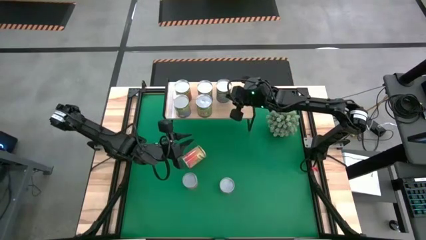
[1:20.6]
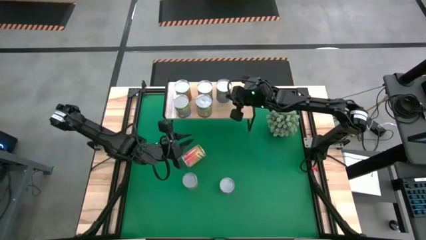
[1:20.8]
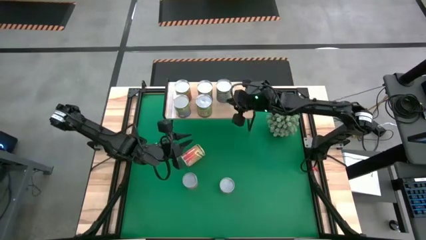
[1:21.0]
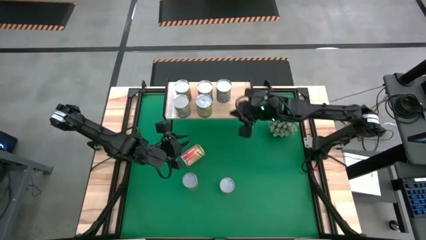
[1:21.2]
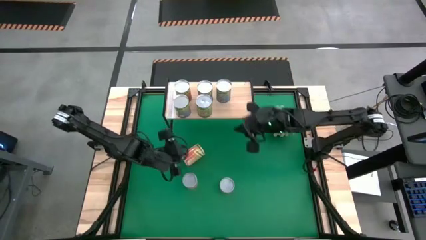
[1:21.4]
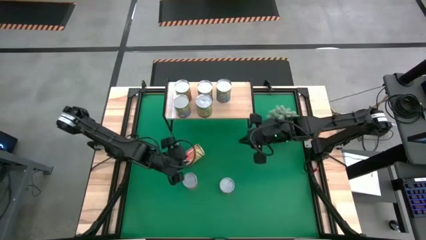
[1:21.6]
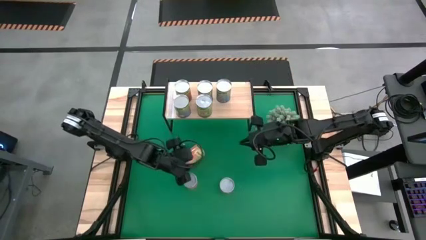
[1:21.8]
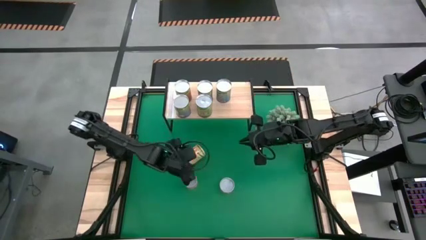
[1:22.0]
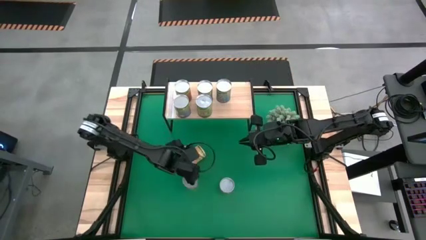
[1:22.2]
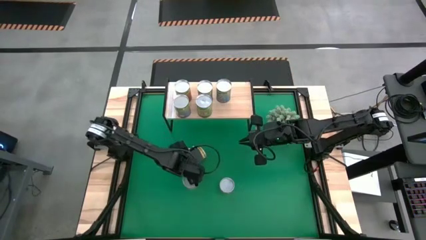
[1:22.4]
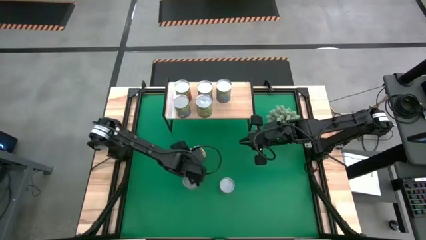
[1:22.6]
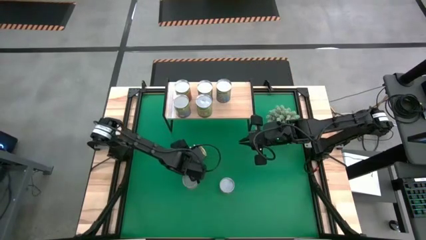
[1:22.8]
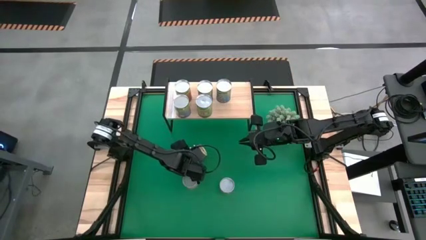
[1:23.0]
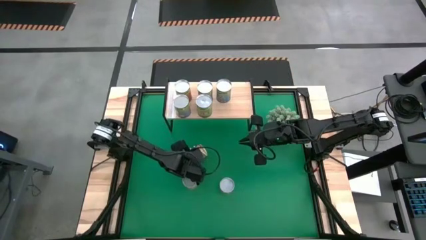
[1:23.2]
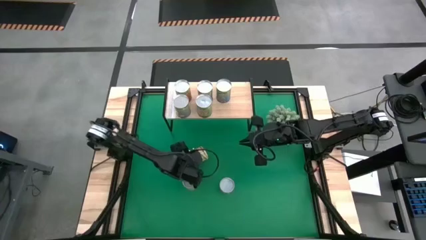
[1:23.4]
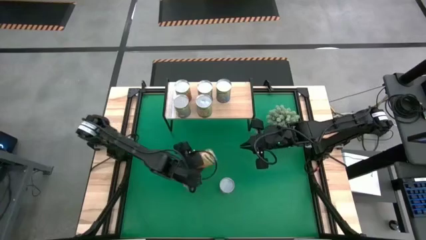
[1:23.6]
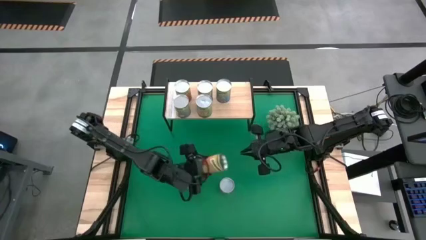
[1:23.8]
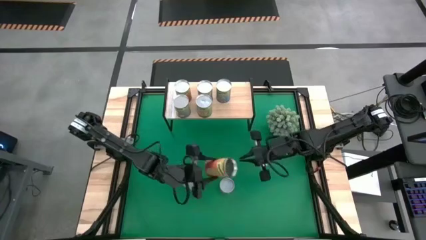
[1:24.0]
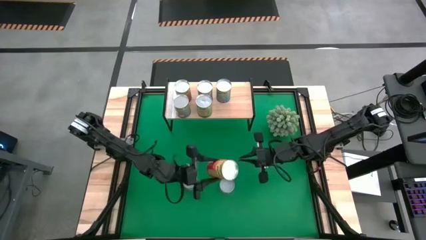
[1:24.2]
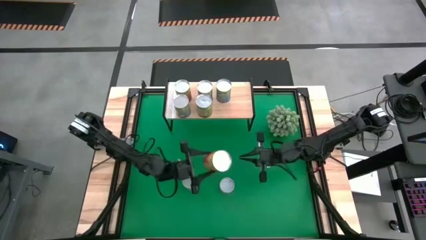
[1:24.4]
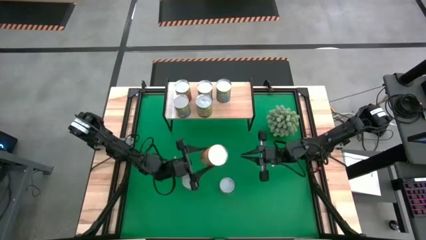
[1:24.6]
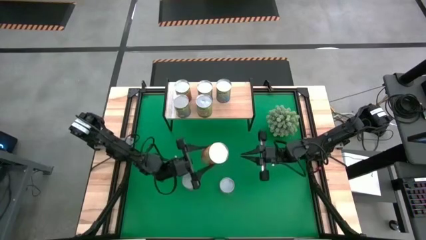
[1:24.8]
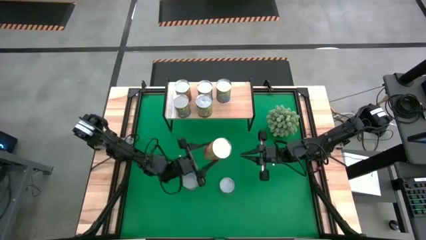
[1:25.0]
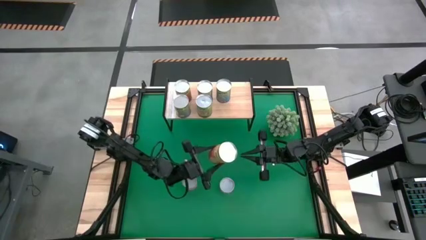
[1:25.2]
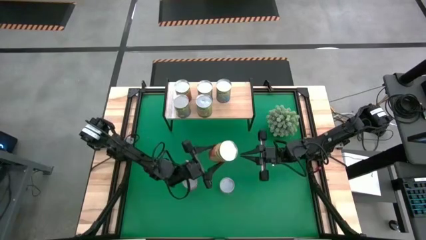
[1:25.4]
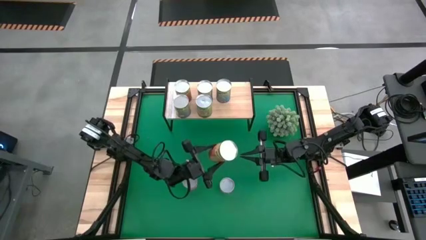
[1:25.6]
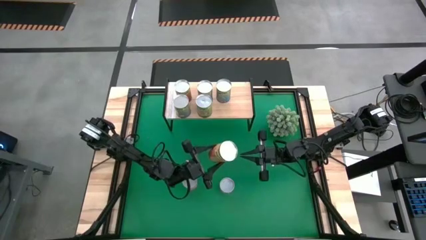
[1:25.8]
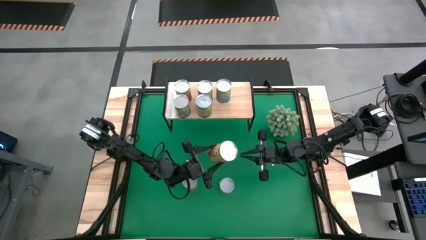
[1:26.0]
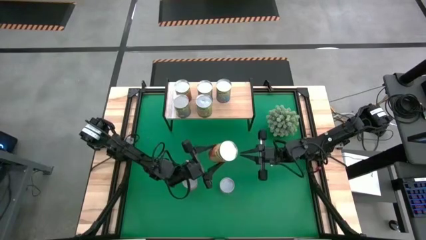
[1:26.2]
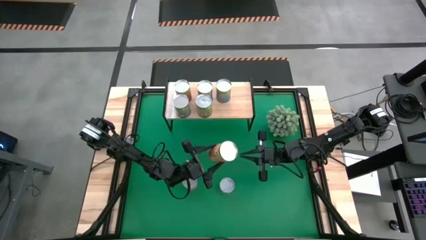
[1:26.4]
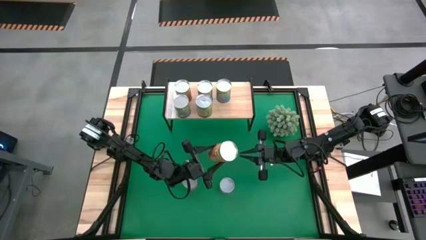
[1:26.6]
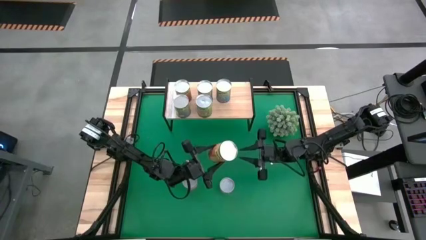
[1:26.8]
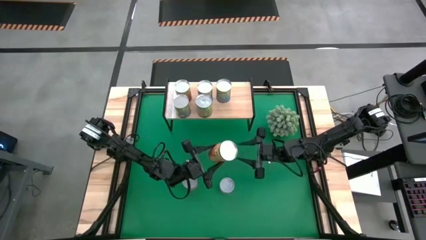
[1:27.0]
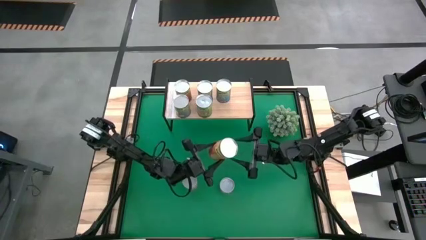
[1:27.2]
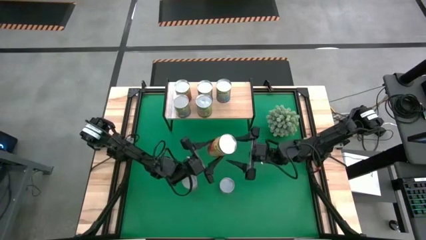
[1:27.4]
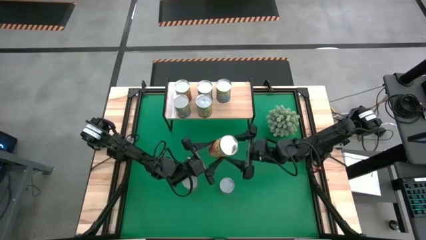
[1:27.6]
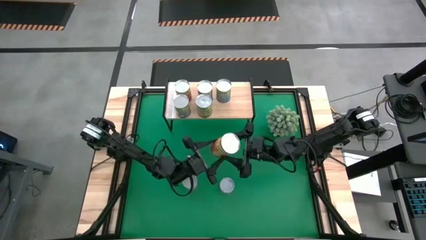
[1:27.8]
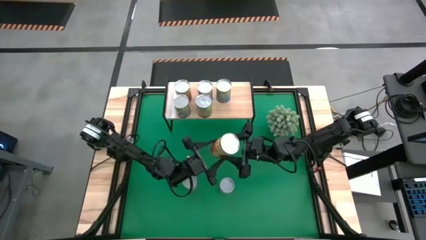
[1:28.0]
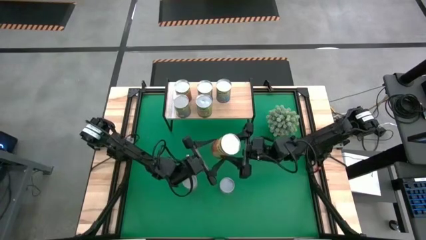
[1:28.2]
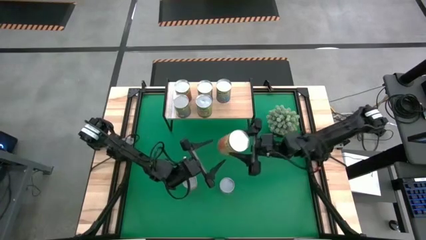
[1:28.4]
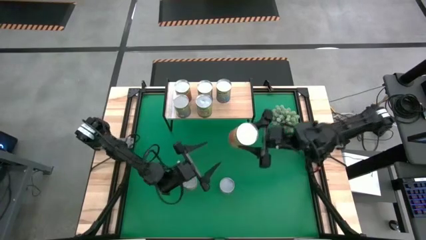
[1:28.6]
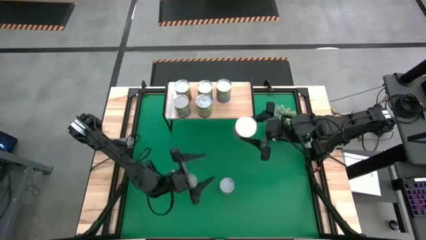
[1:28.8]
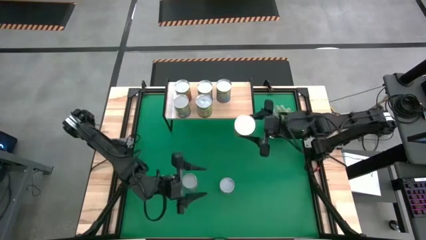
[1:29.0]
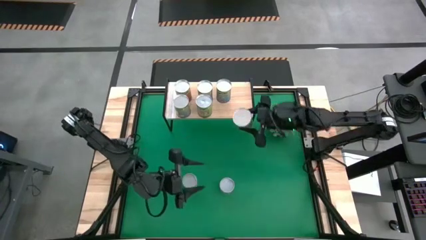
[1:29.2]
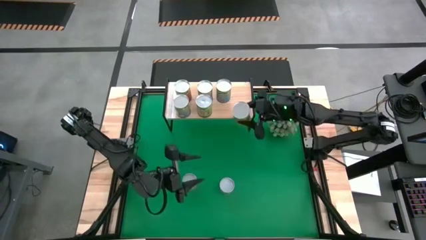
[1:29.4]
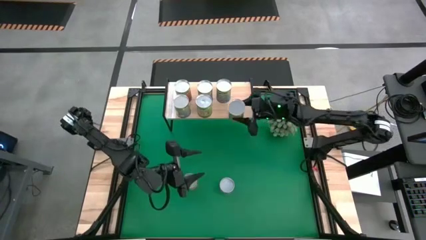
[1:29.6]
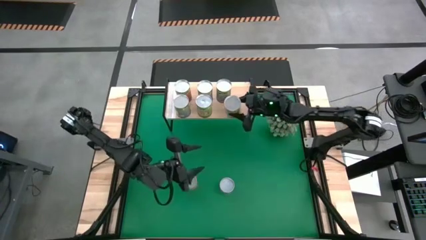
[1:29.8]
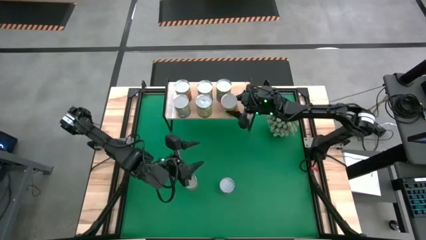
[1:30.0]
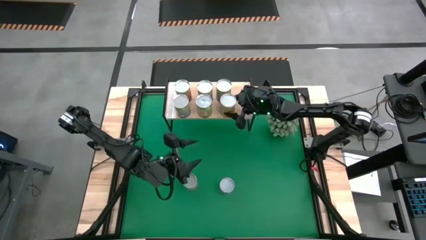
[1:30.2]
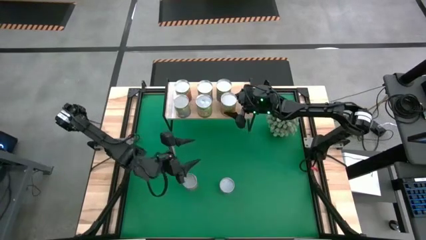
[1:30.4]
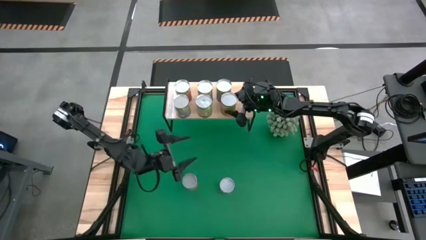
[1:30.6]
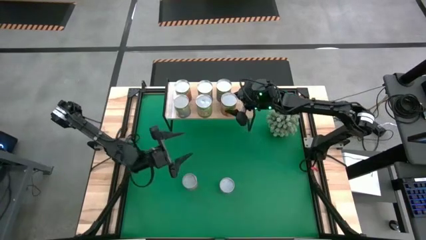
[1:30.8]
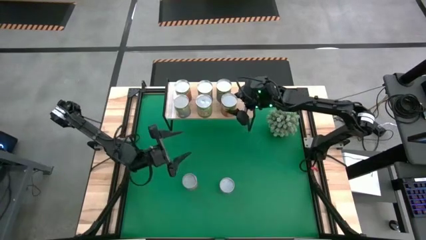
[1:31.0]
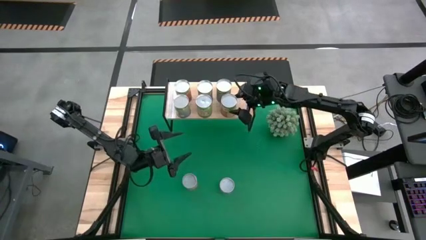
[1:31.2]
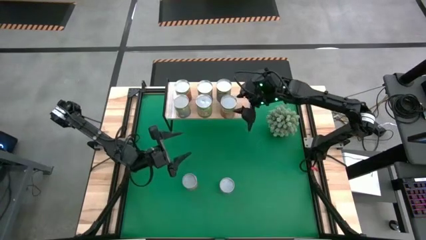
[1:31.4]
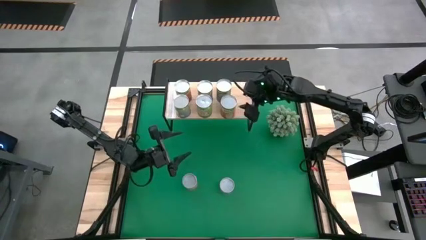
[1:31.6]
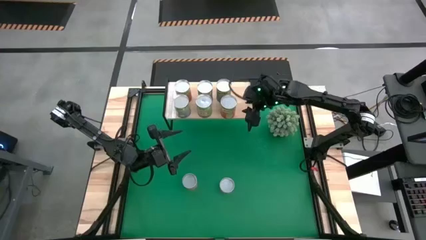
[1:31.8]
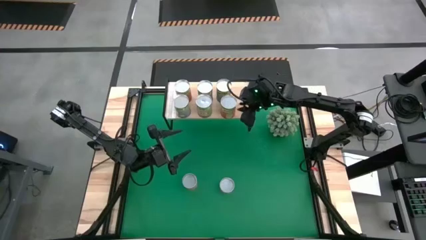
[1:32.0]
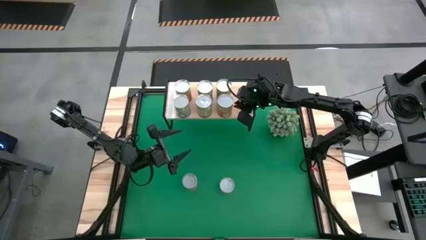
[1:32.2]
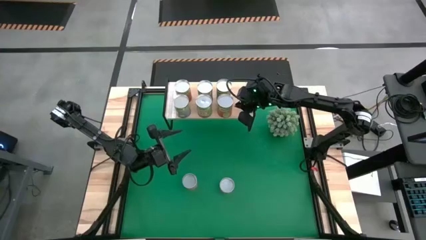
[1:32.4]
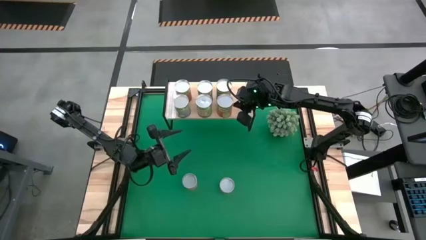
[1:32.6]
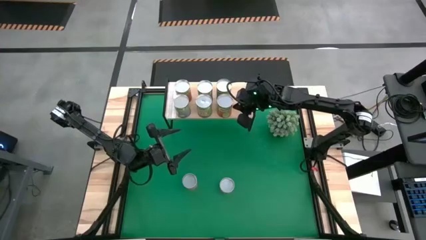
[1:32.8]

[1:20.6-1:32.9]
Task: Pick and place cans onto a shelf
Put the canned pineapple on the shelf

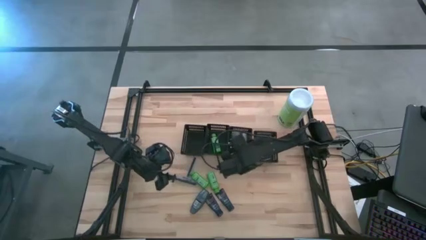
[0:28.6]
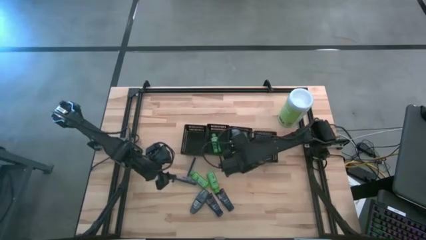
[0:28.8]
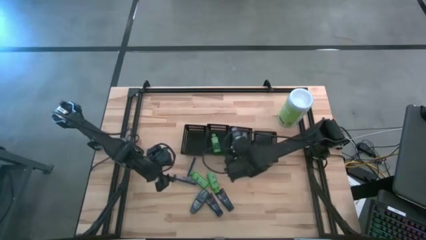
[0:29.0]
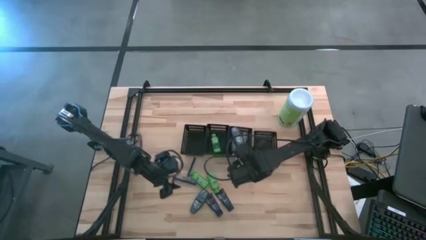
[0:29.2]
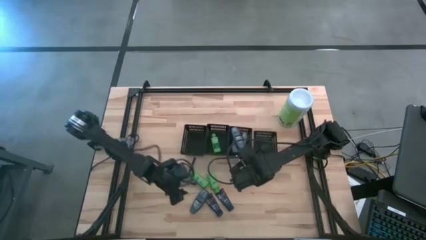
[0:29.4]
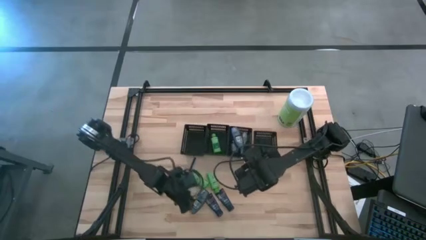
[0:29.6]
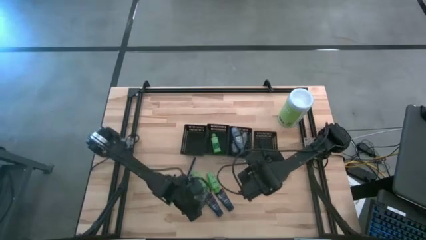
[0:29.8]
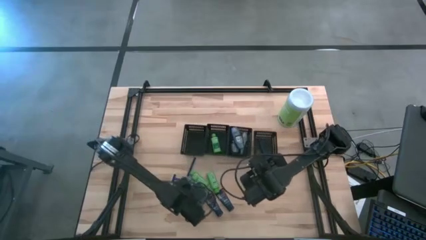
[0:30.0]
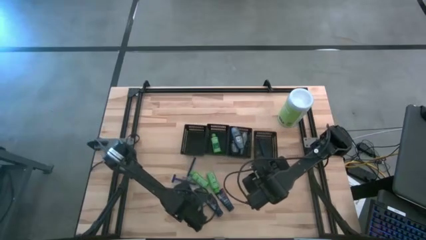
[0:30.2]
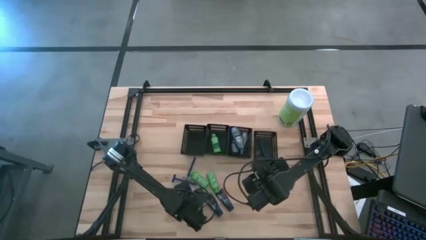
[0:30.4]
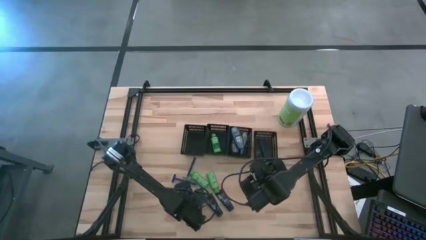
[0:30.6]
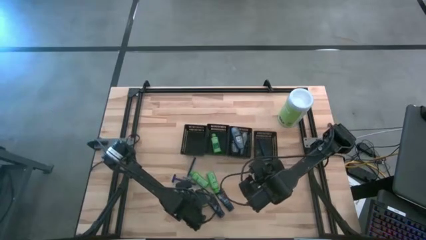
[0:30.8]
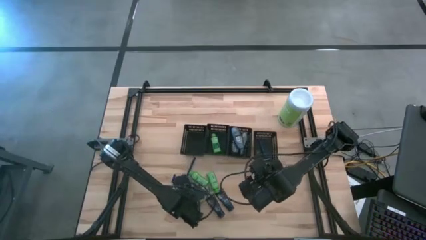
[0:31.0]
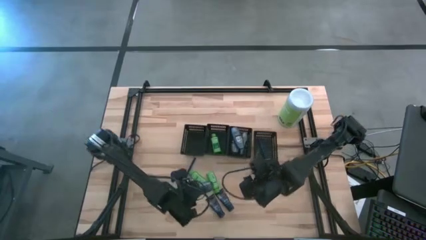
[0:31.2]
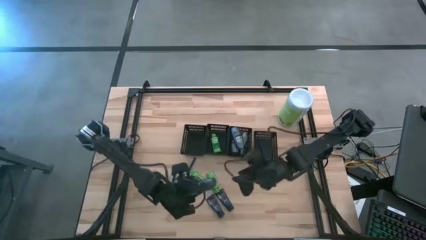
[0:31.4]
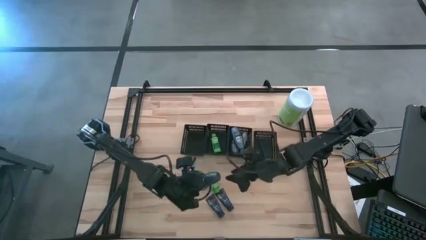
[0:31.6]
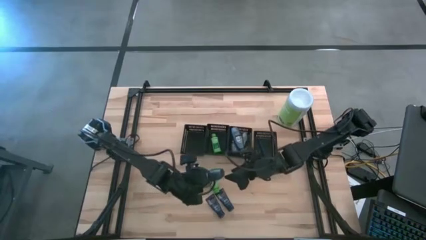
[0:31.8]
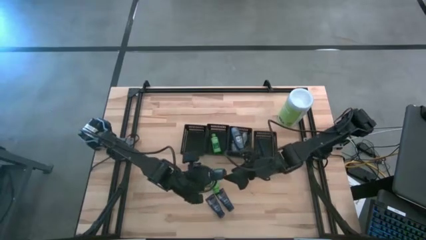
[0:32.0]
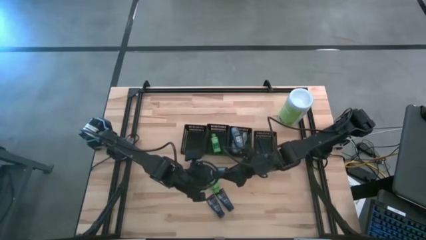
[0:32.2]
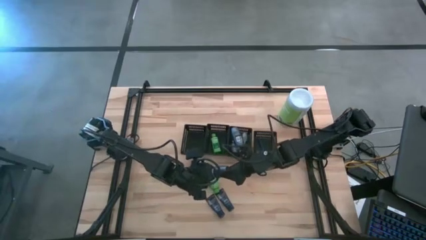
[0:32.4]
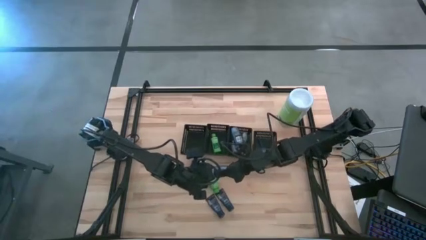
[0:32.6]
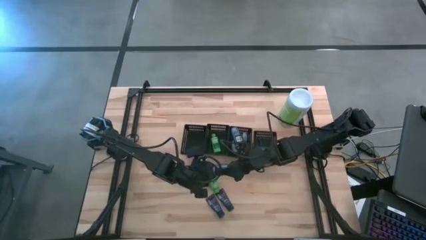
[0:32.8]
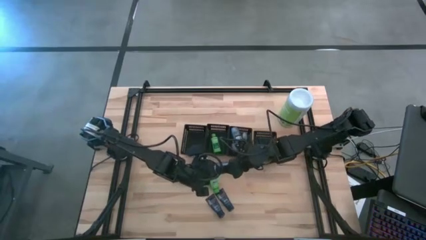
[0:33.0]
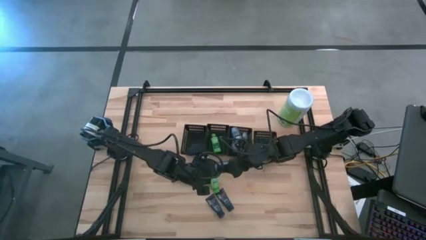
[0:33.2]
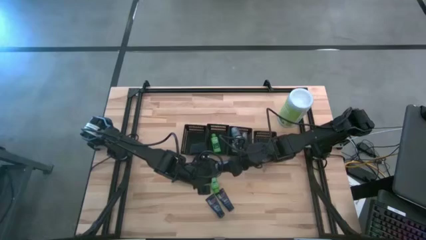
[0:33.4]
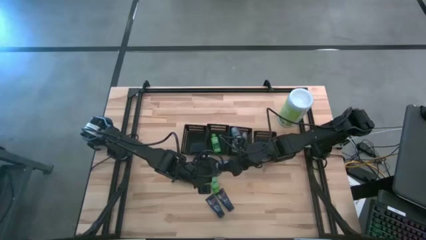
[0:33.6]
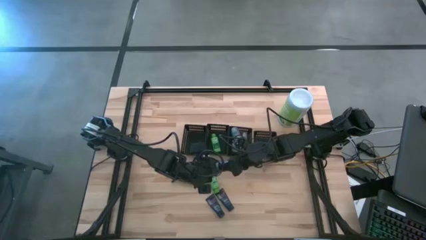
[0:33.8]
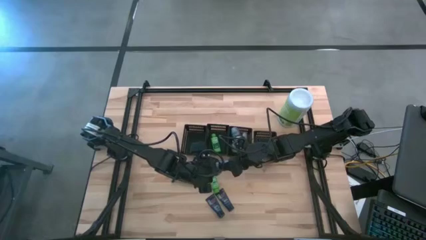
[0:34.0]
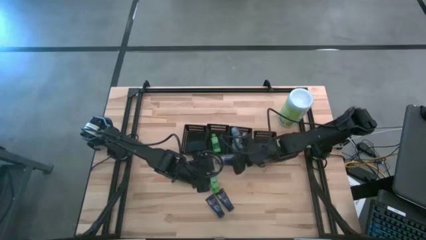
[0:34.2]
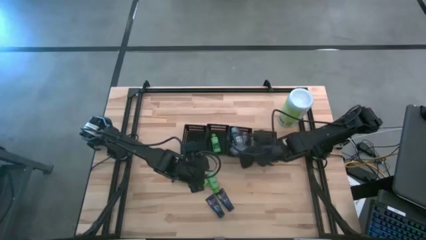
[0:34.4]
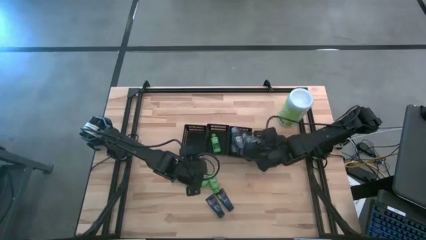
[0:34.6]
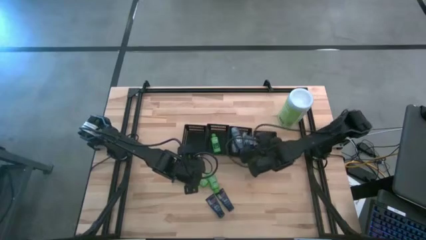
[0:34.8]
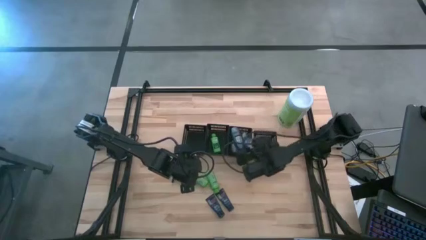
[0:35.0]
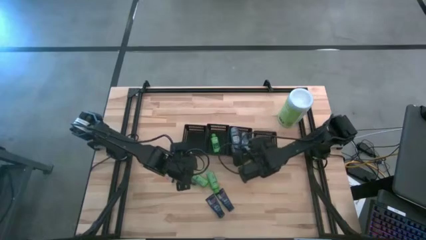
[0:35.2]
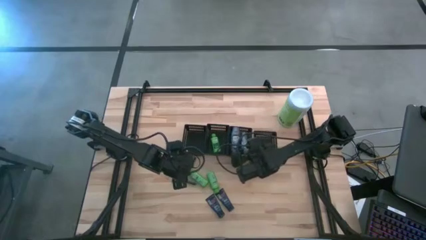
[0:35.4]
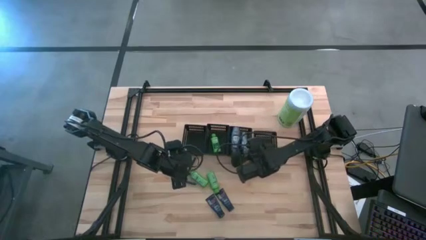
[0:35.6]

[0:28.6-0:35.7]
Task: Pick & Place Travel size toiletries
Put the deodorant into the middle right black bin
